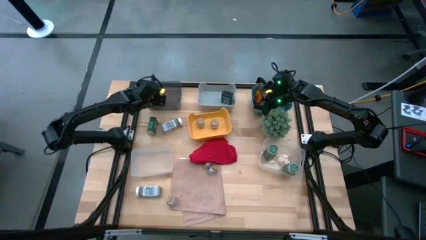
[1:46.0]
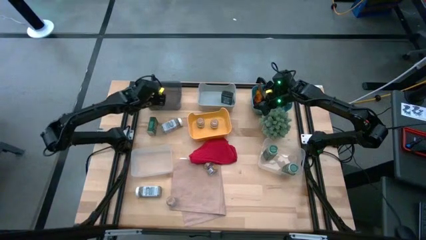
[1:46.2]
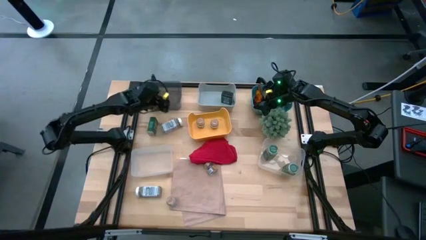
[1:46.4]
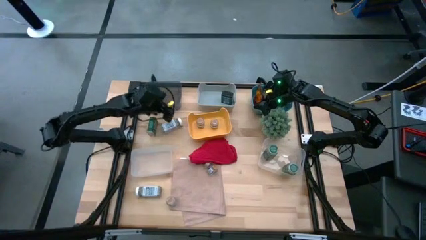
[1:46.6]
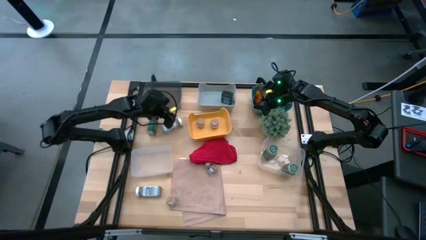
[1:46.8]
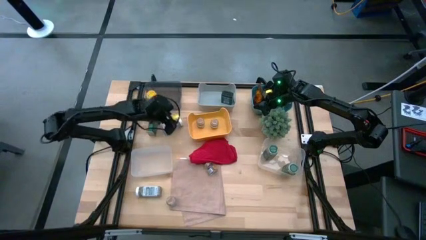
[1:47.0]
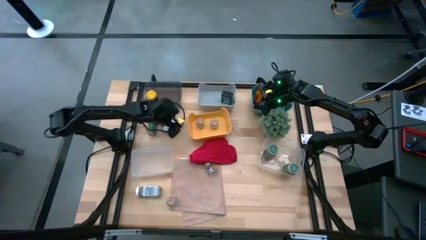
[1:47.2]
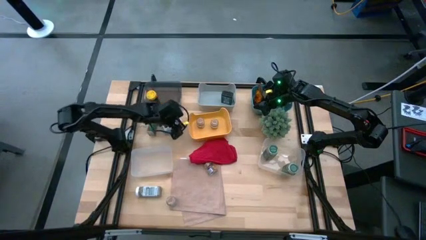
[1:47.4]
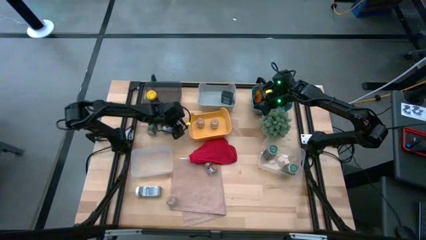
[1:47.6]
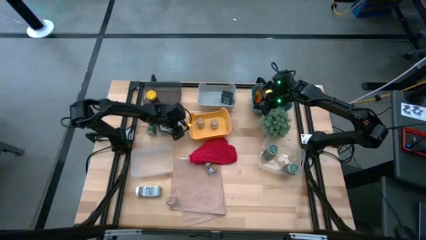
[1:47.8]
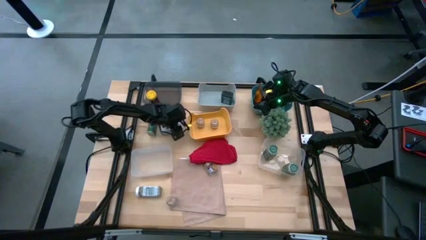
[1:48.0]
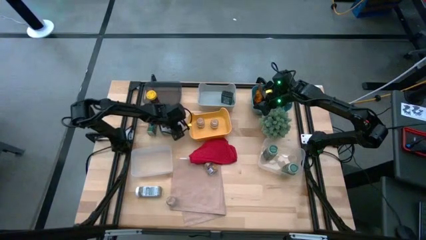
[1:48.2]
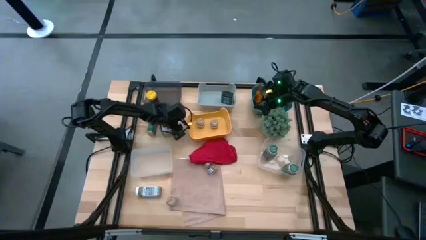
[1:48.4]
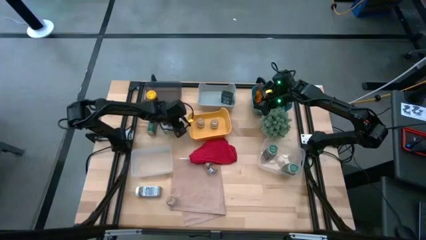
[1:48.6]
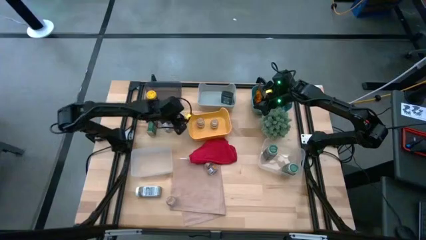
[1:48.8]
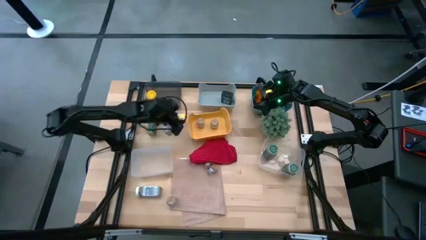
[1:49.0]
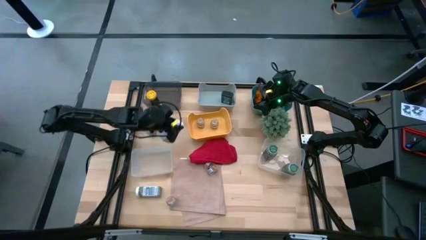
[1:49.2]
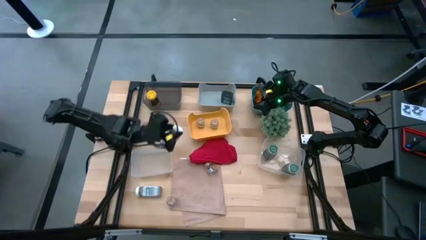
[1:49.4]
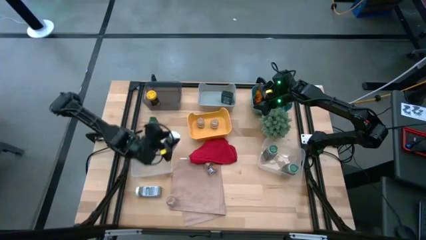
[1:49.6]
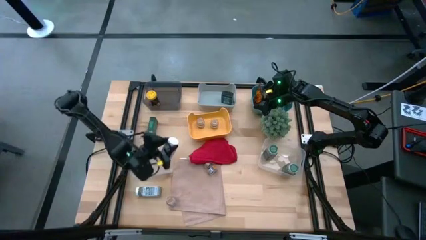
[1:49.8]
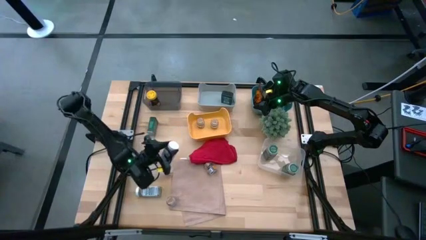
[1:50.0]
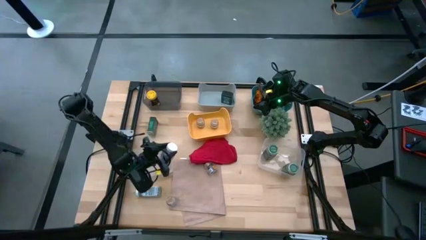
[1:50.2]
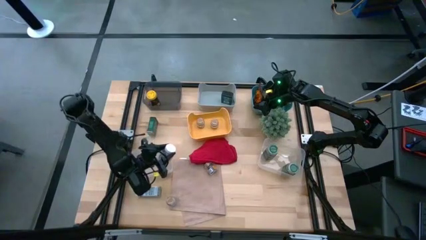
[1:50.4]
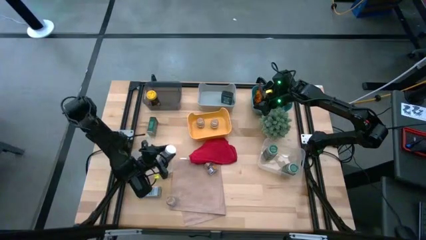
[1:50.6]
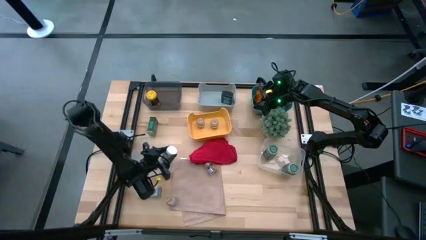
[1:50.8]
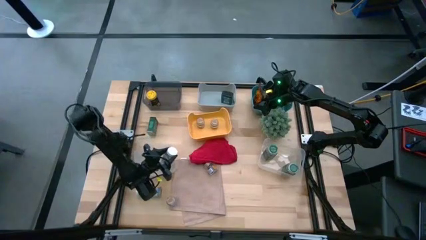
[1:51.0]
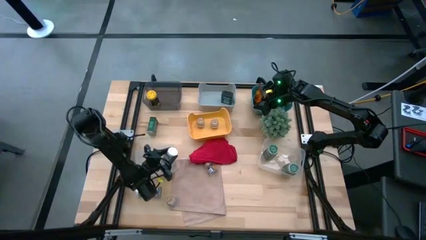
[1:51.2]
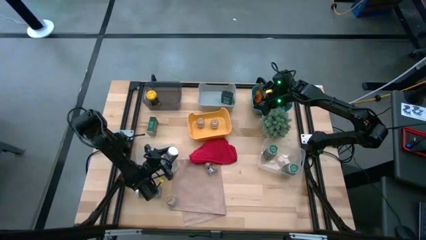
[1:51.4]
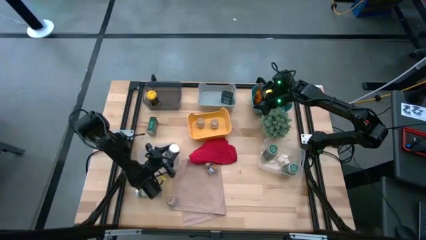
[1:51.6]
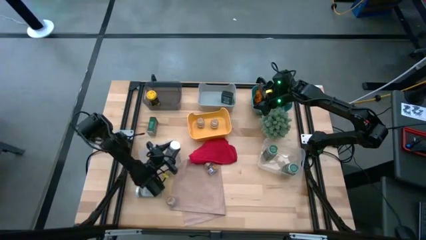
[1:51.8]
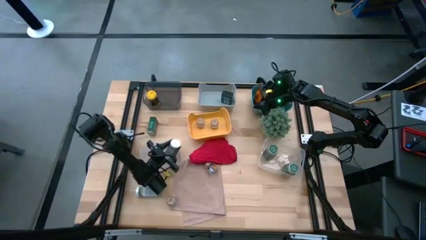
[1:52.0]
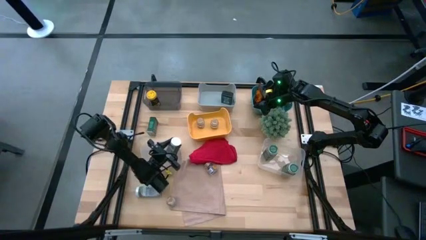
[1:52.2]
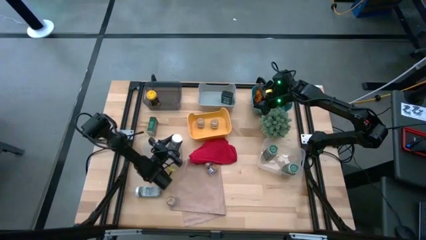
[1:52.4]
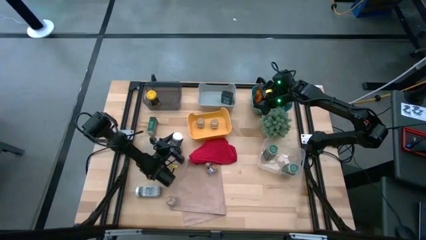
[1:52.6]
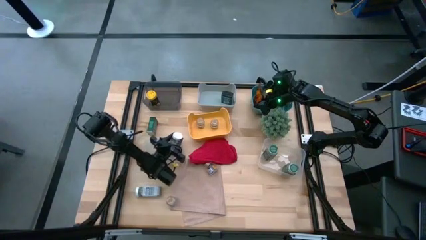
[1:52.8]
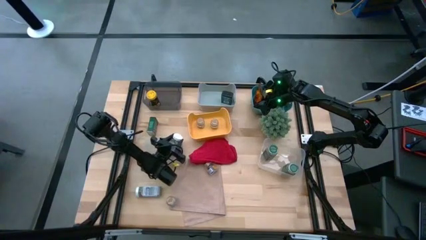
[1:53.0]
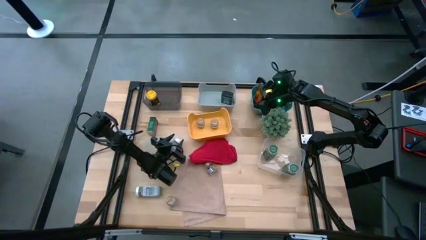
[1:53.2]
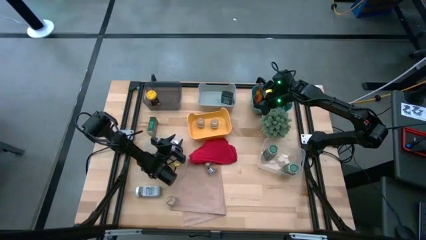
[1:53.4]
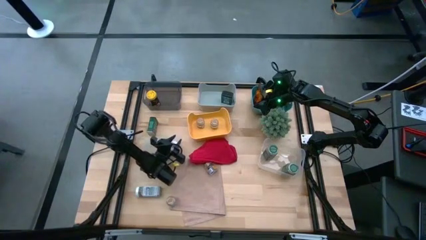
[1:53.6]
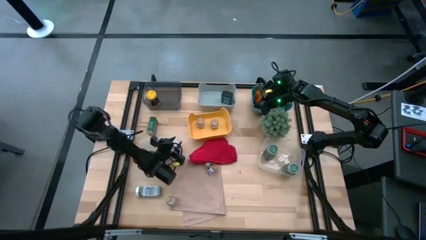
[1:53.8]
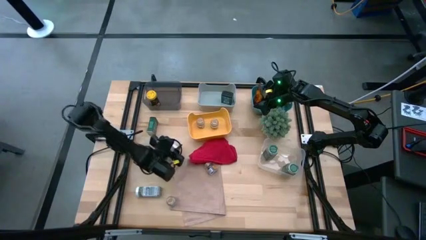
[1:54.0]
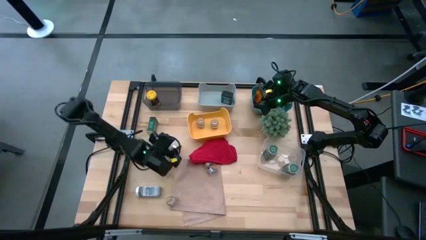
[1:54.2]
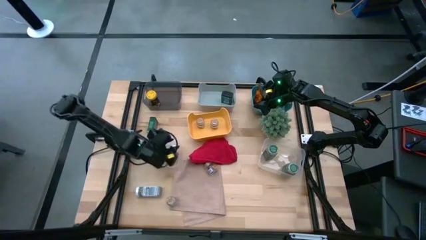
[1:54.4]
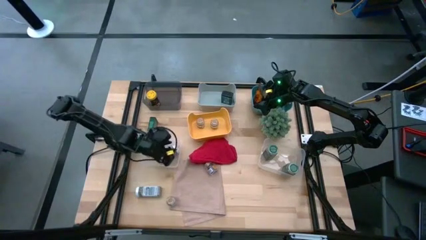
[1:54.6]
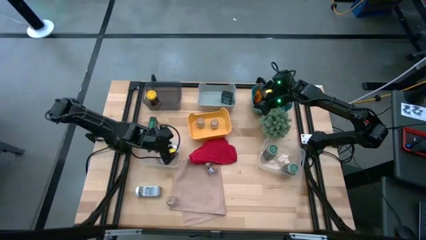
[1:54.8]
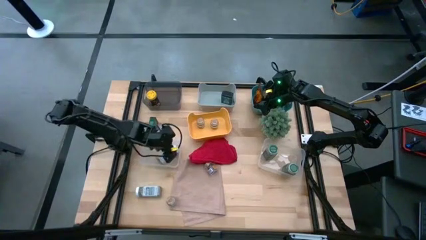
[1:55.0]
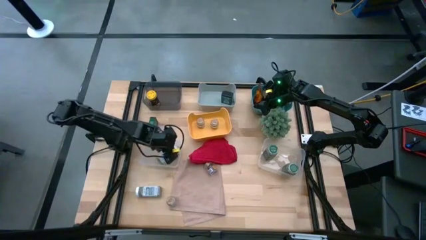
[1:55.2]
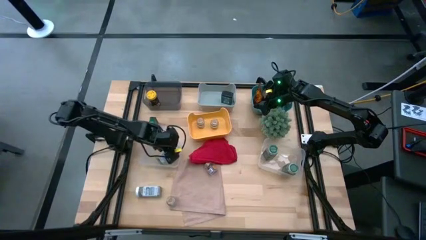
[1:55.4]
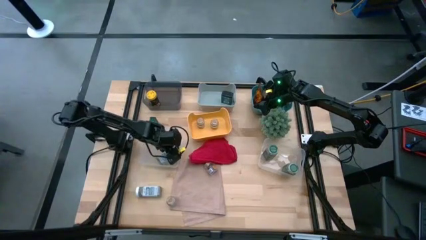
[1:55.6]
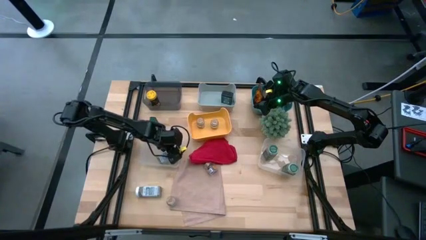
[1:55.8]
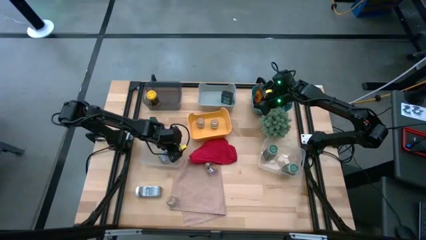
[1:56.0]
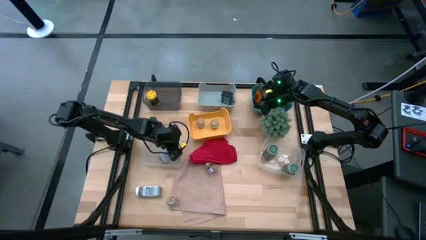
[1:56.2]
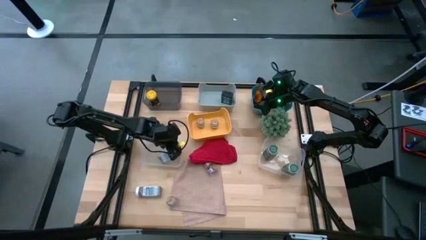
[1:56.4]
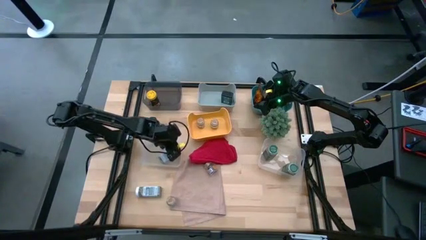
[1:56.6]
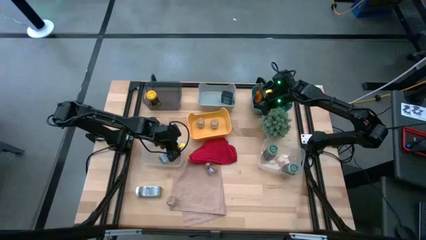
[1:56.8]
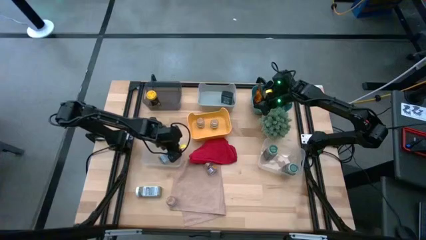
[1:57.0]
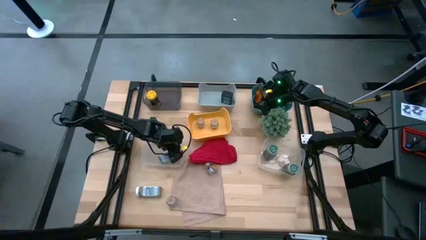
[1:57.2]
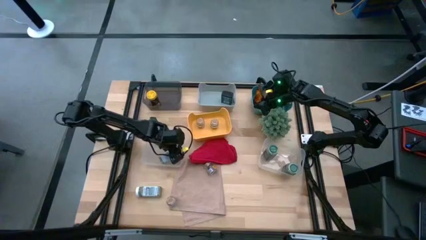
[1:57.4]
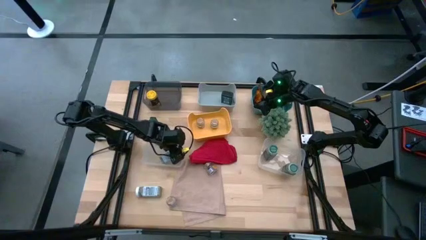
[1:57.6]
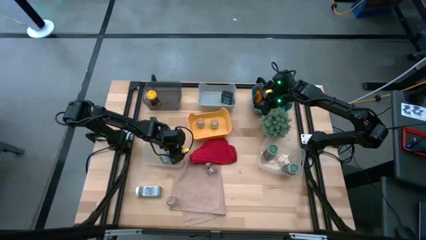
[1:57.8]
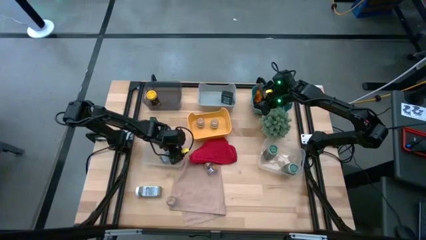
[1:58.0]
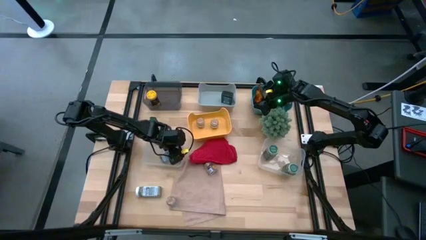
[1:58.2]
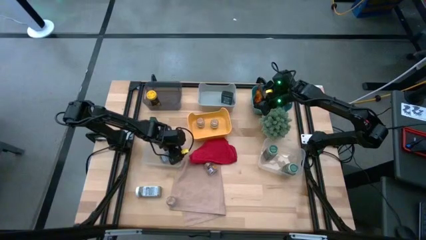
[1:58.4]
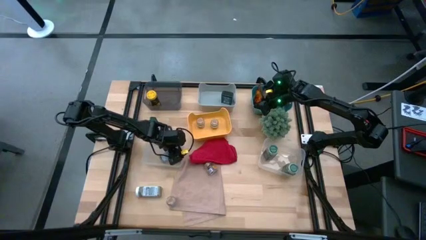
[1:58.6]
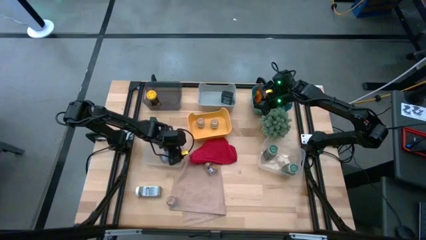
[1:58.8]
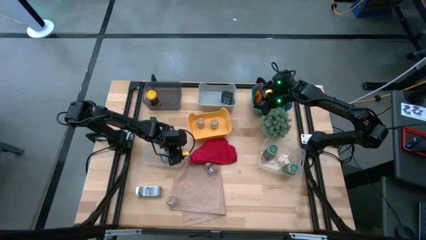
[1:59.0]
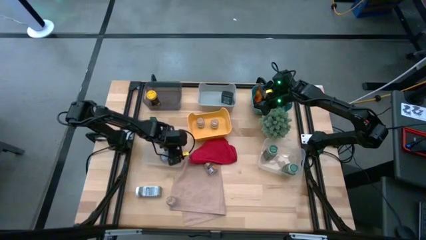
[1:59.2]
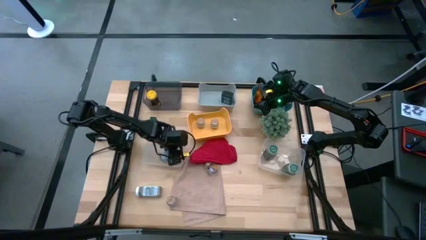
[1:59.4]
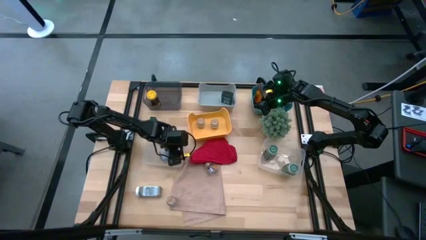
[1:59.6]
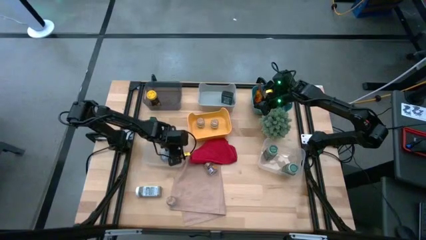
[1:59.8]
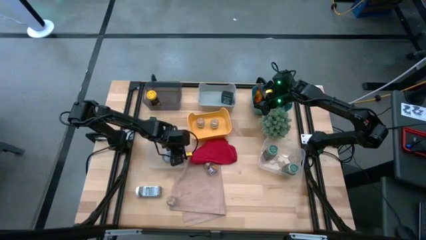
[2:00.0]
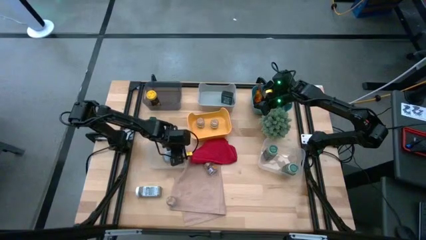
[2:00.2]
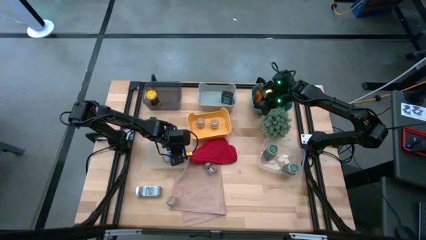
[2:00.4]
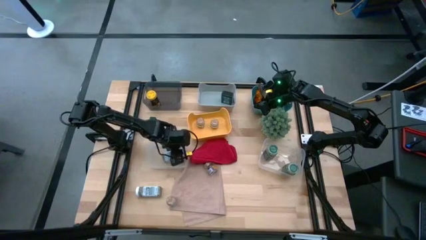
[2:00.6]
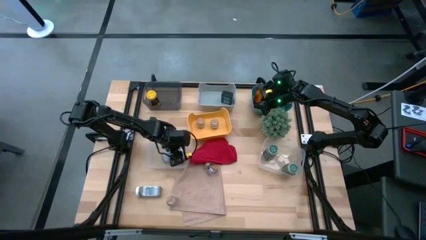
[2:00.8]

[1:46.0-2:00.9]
Task: Sort spices by type
Put the white seasoning bottle into the left transparent bin
